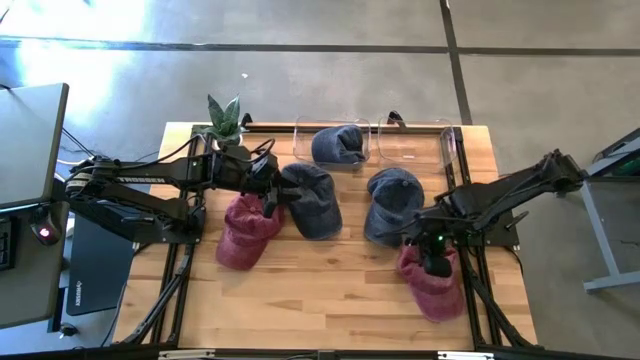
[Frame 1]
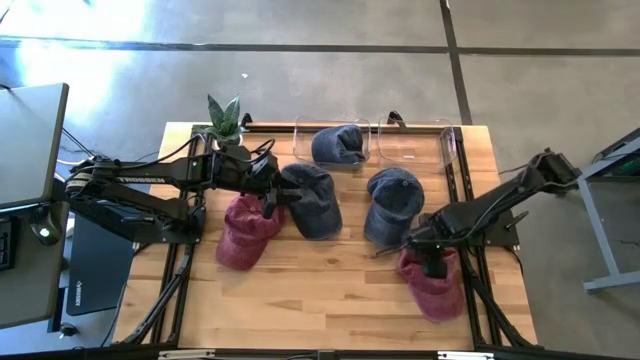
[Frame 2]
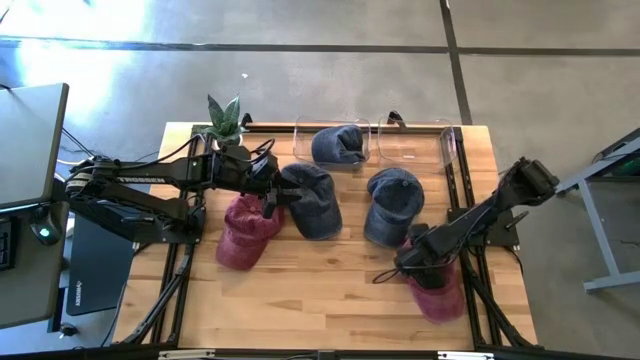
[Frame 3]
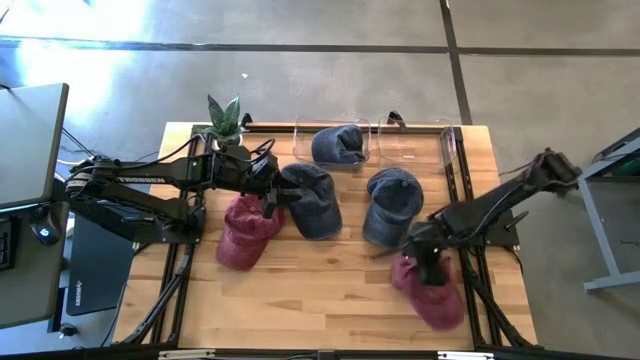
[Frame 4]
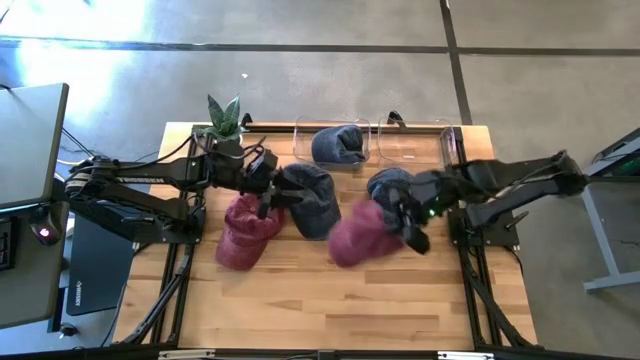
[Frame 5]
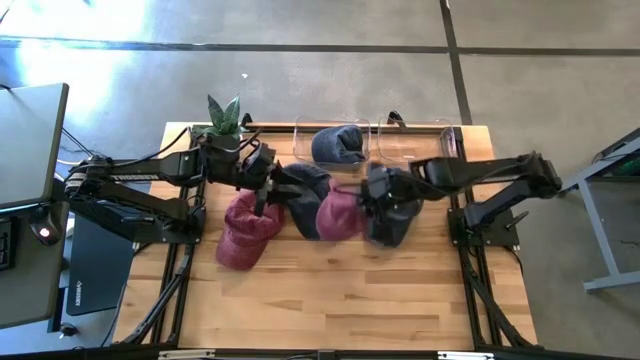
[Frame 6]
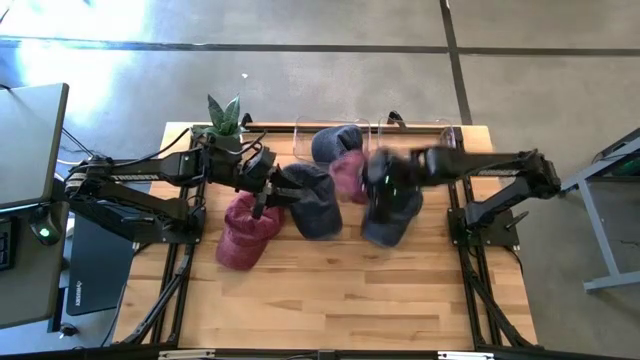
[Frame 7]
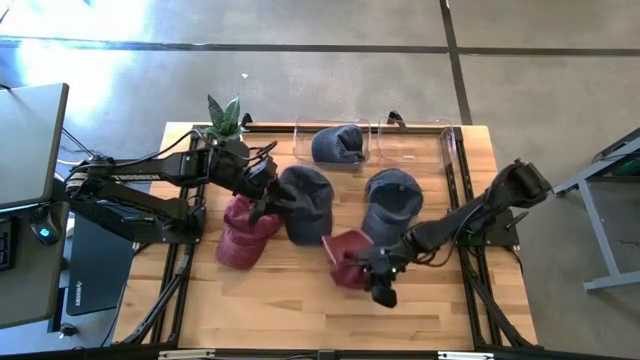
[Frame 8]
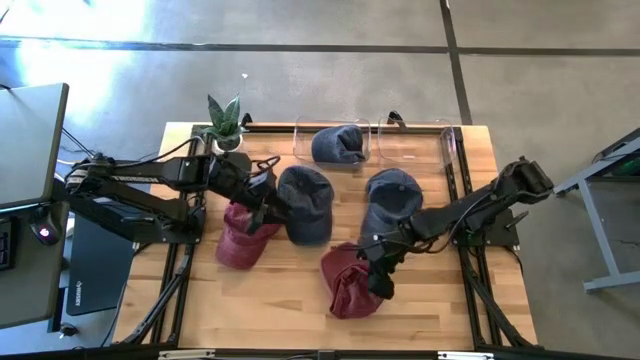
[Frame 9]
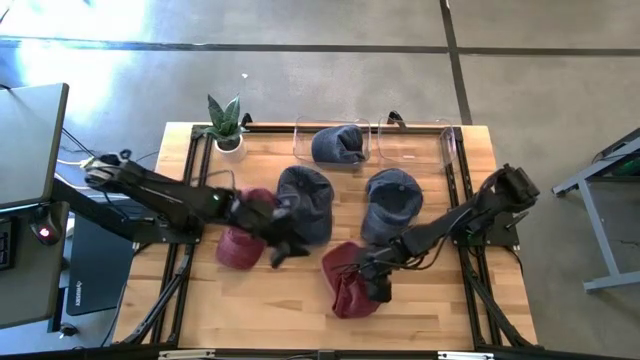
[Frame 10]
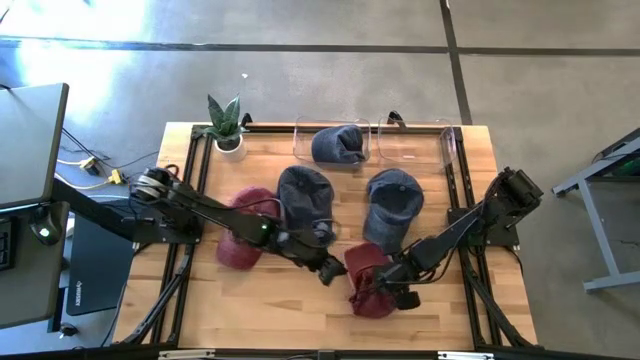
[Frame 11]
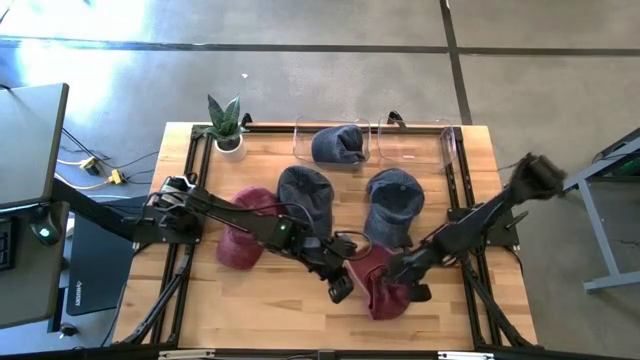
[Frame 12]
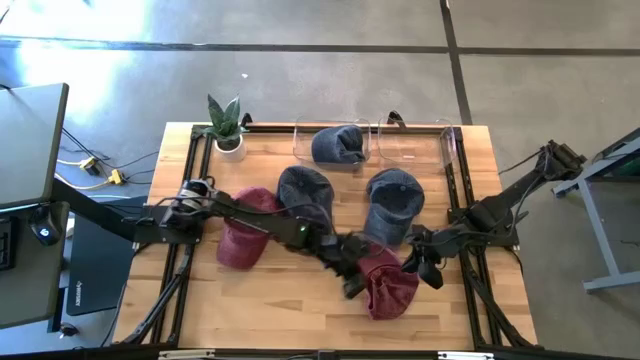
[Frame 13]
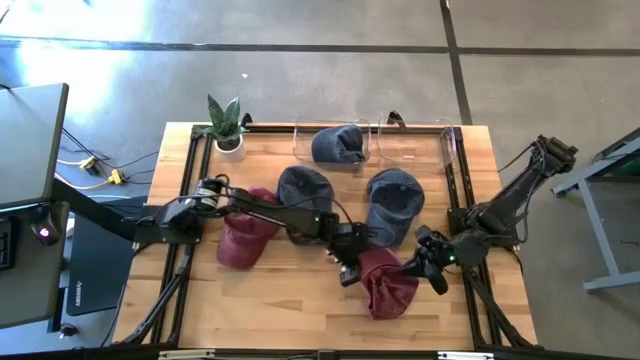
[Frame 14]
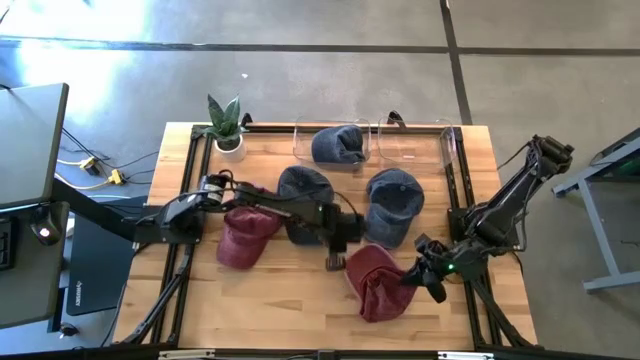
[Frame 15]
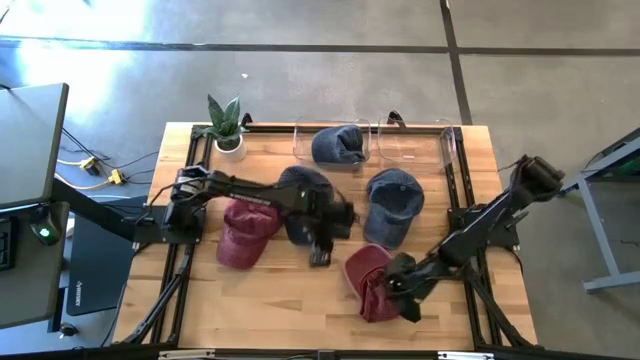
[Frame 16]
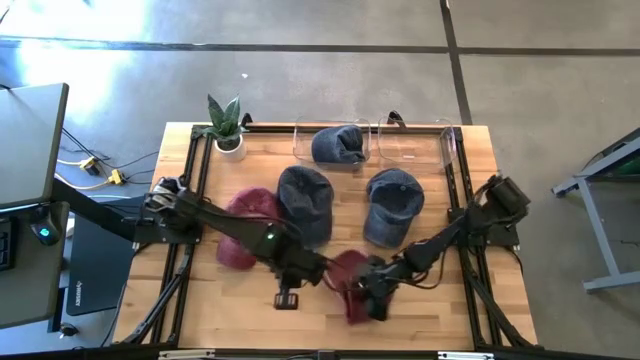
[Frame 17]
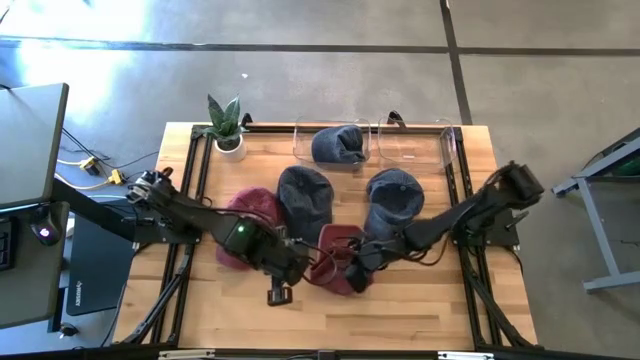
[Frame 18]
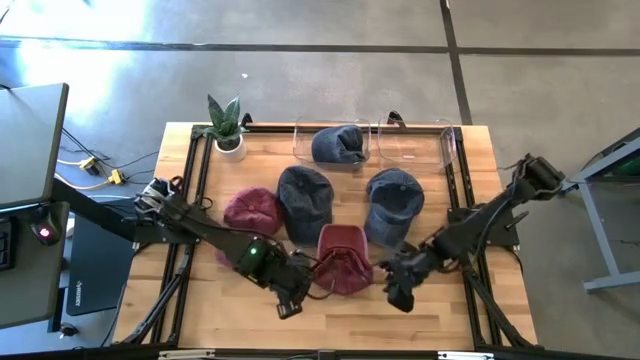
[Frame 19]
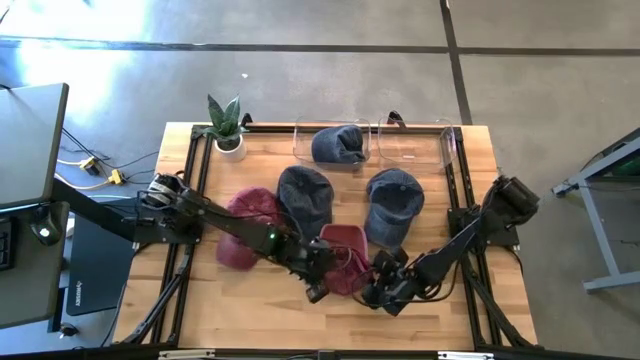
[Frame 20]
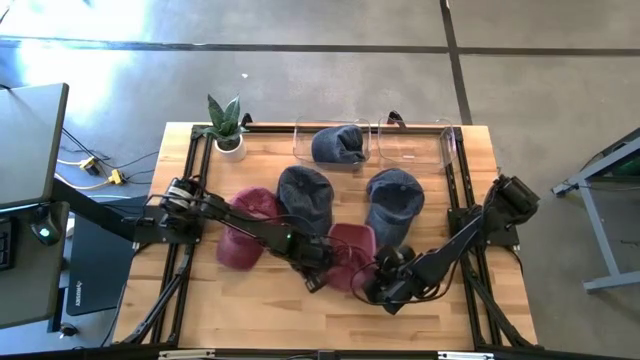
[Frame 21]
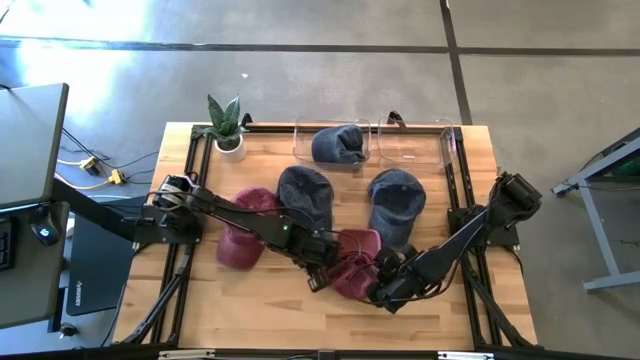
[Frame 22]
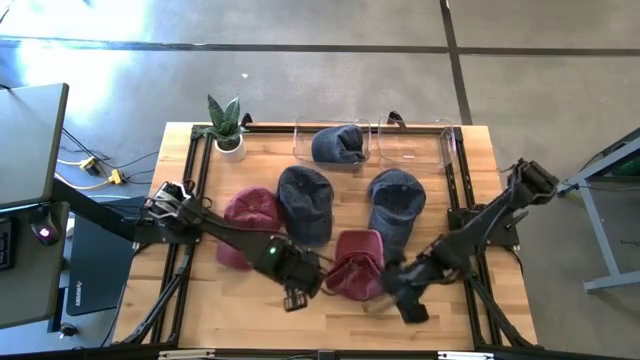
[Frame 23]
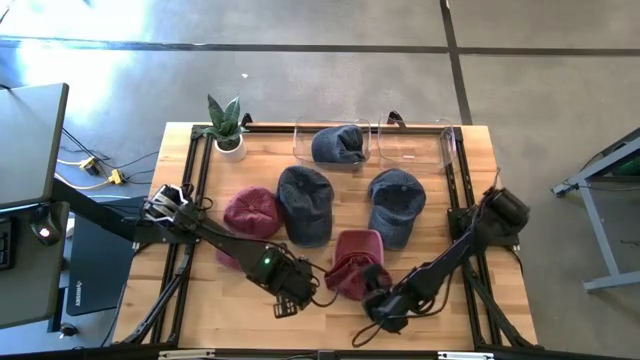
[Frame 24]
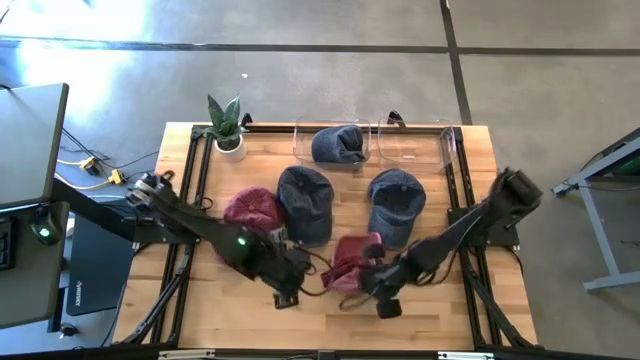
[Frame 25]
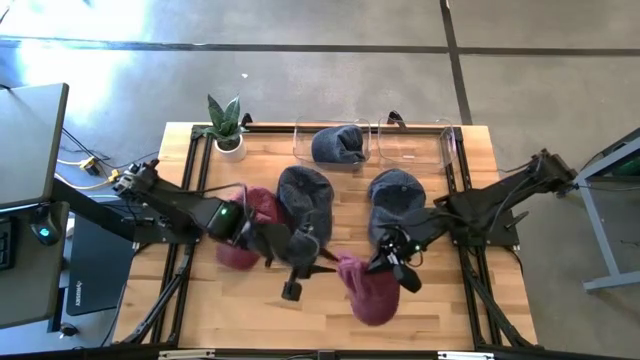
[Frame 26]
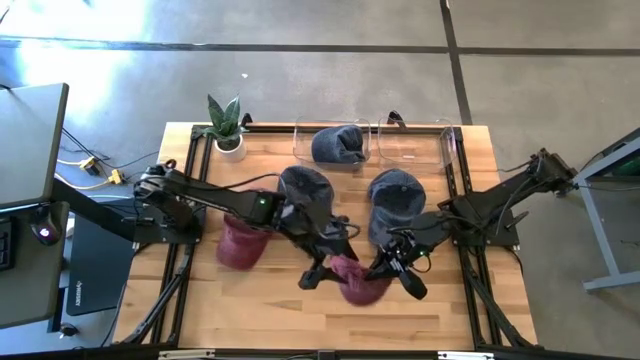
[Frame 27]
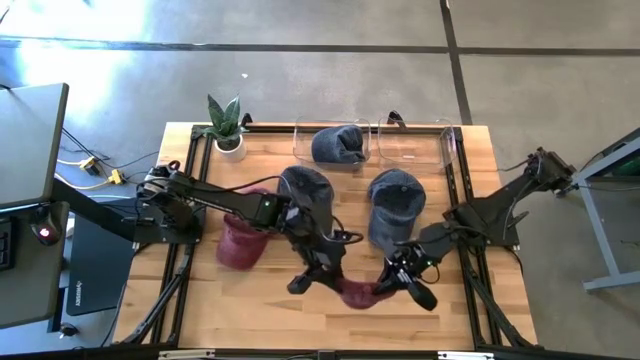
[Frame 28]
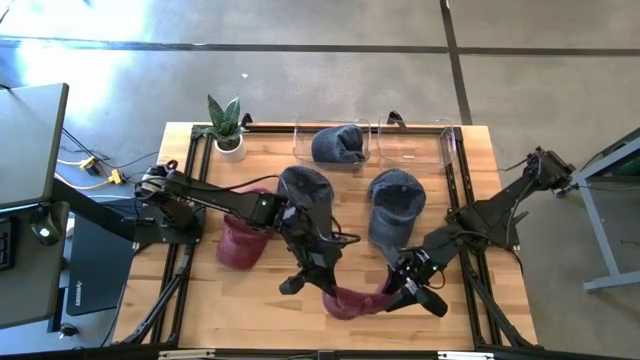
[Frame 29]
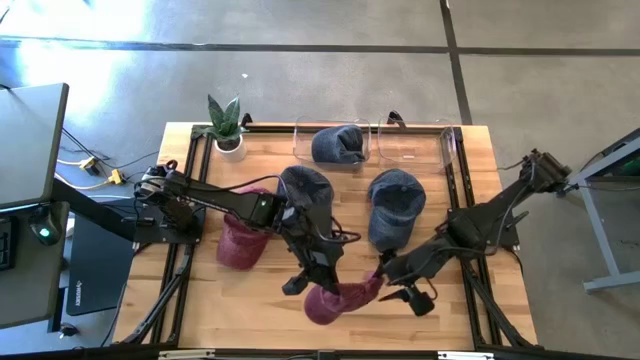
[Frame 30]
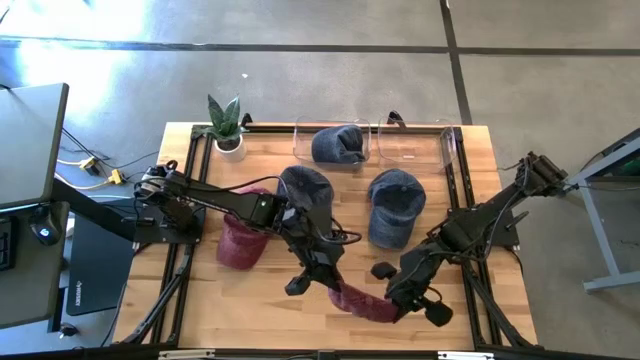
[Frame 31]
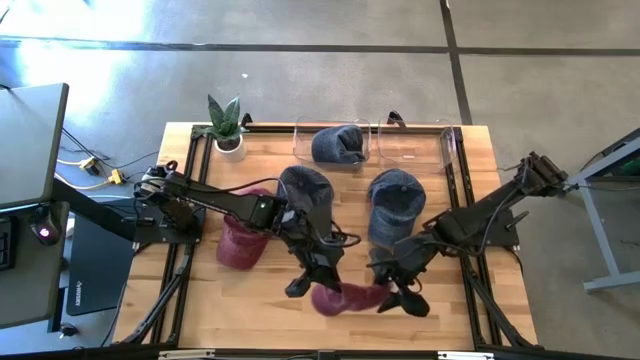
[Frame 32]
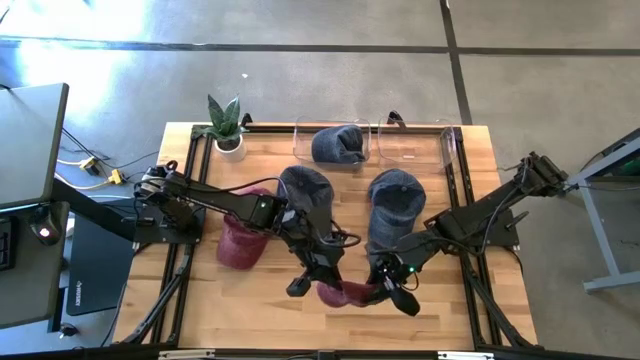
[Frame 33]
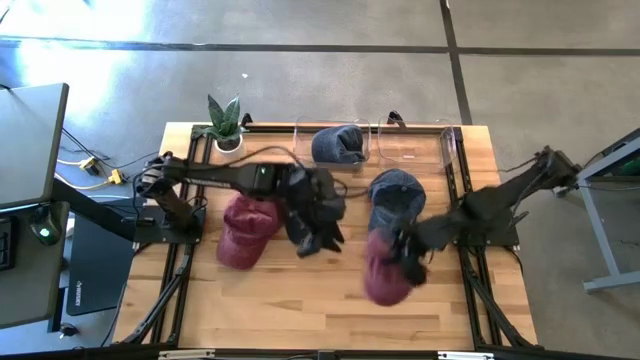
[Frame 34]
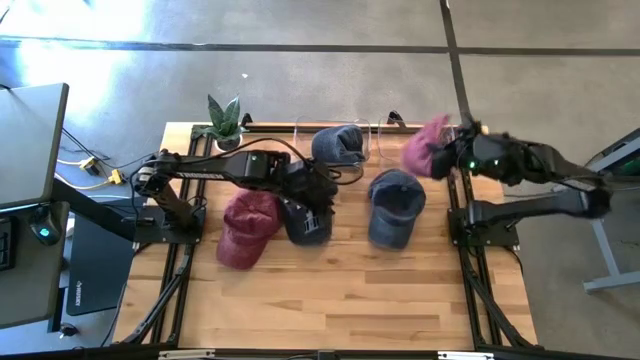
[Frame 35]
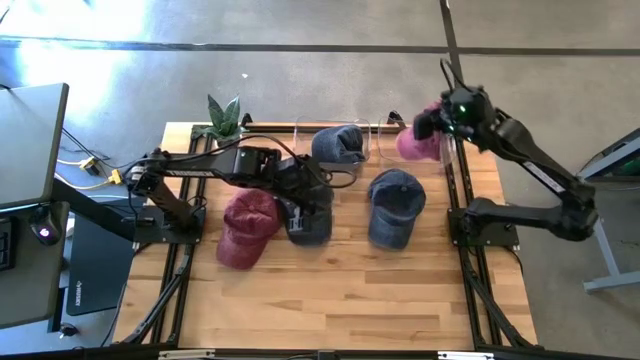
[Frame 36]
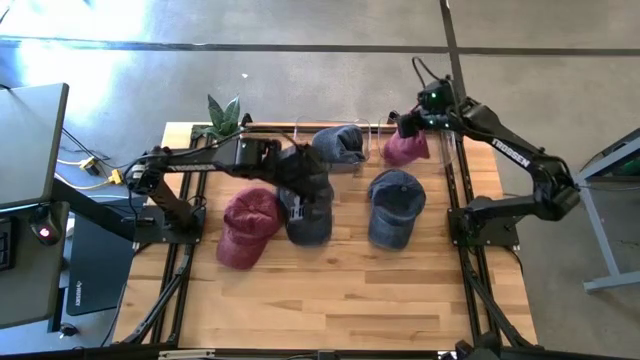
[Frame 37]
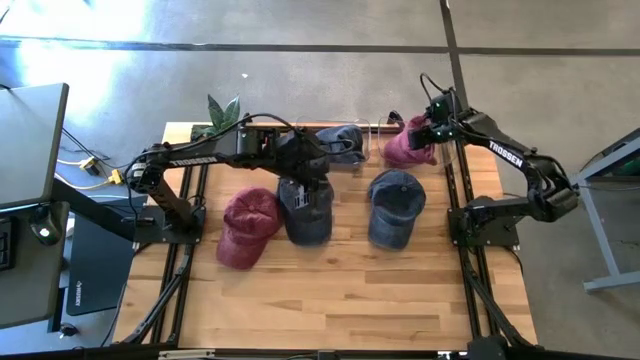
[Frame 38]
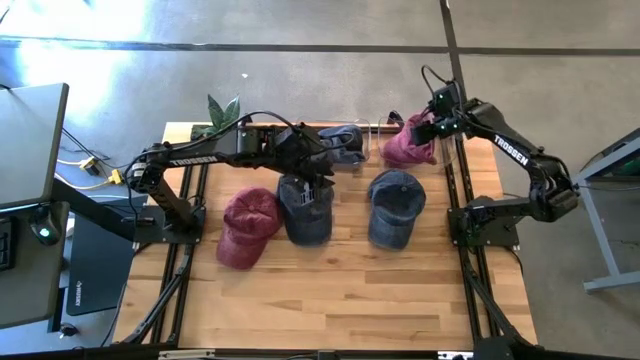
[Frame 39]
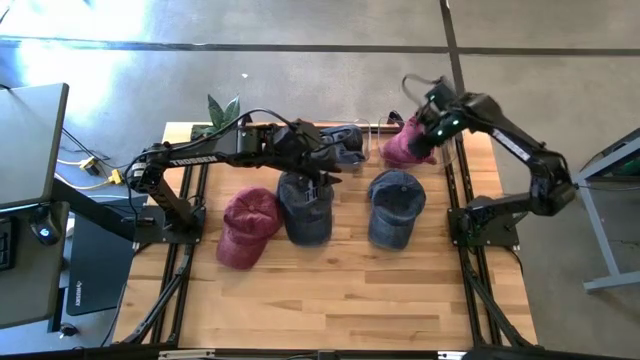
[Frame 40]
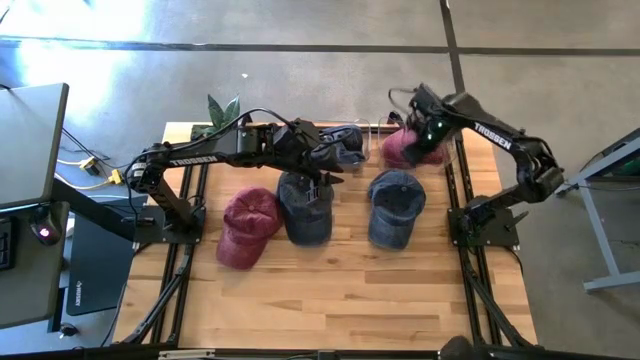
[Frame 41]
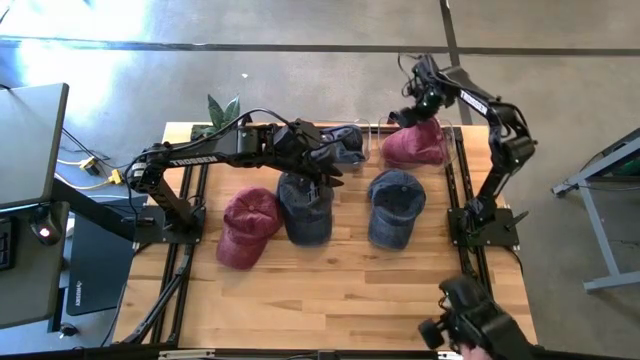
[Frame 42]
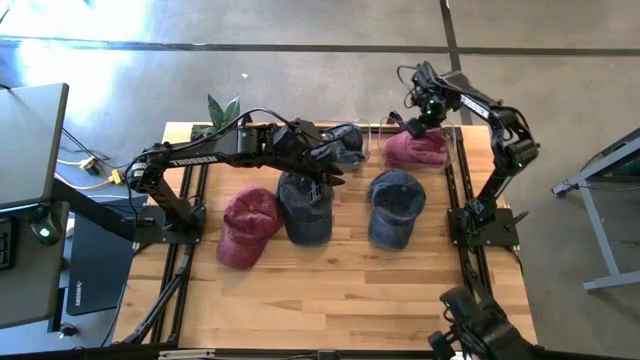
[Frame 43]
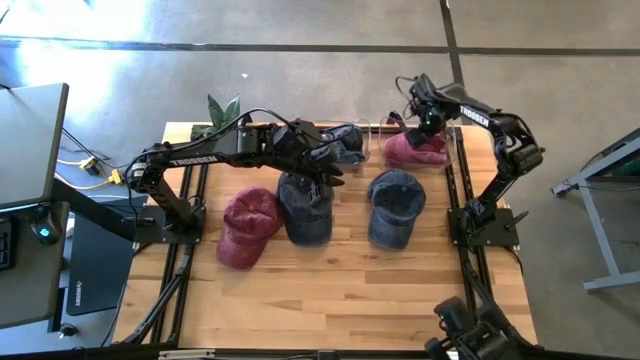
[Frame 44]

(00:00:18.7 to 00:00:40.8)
Task: Pick & Place hat
Put the right red cap into the right transparent bin
